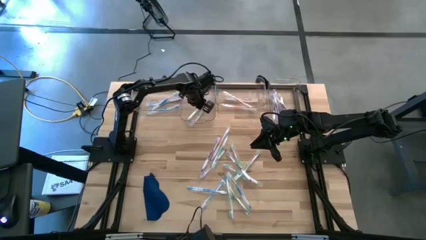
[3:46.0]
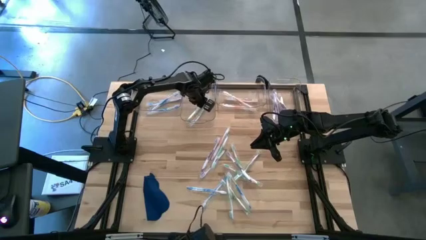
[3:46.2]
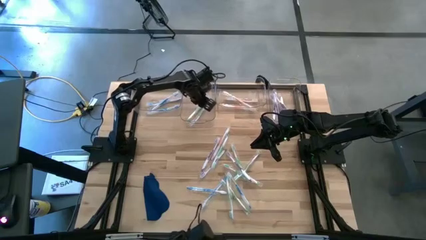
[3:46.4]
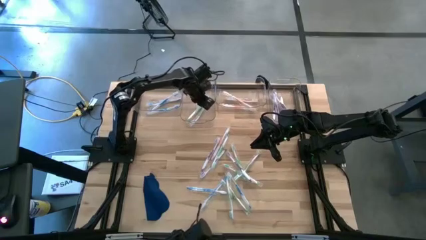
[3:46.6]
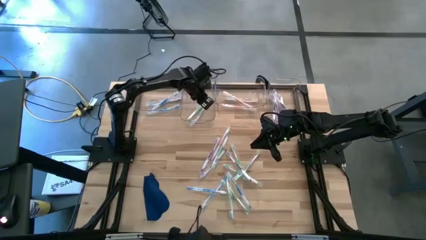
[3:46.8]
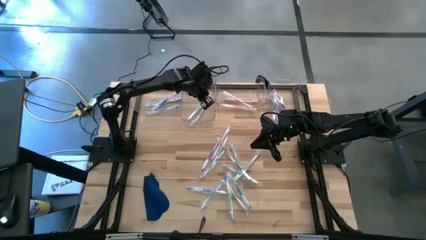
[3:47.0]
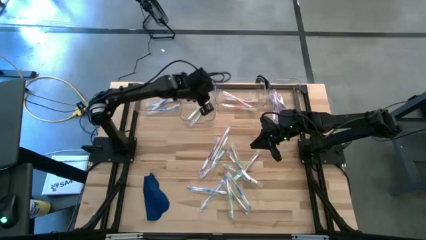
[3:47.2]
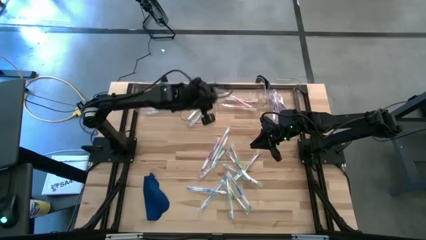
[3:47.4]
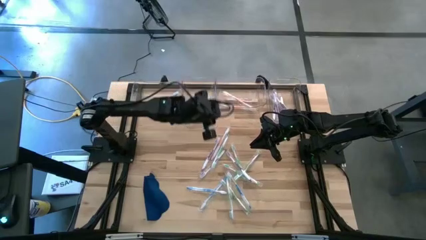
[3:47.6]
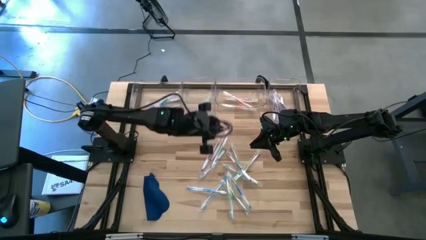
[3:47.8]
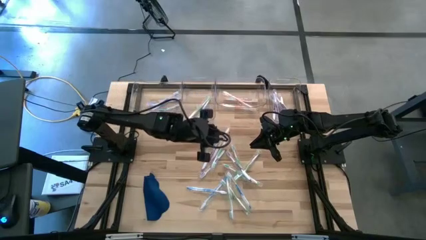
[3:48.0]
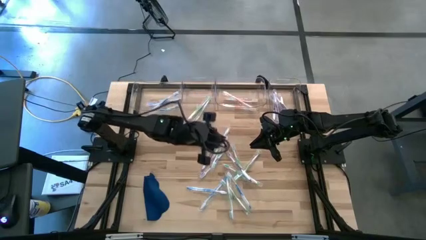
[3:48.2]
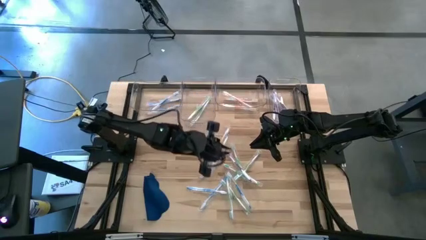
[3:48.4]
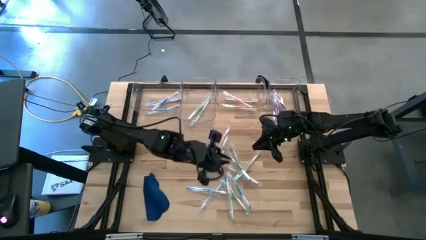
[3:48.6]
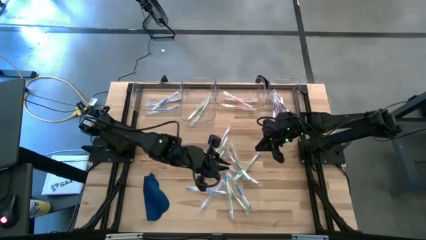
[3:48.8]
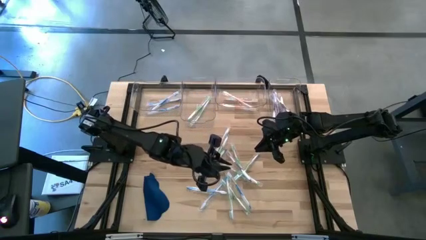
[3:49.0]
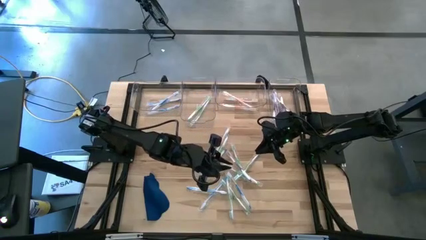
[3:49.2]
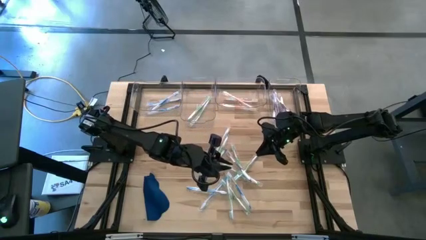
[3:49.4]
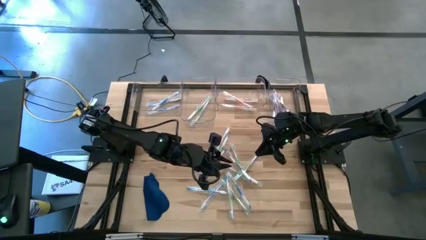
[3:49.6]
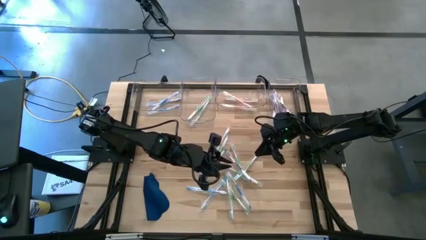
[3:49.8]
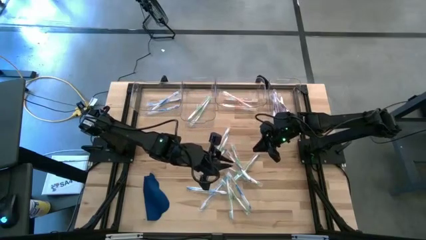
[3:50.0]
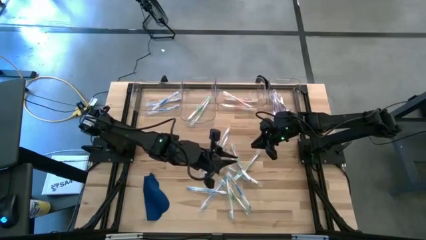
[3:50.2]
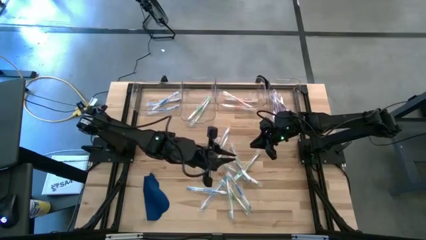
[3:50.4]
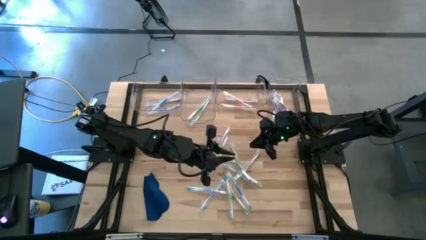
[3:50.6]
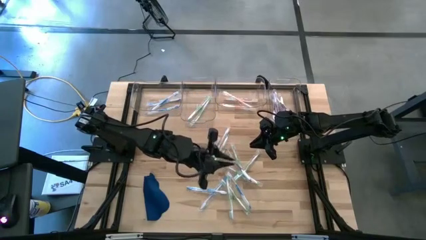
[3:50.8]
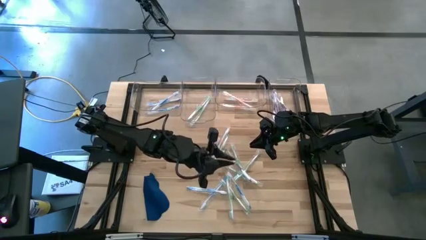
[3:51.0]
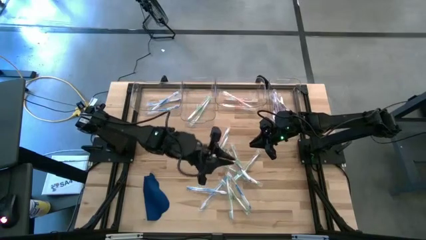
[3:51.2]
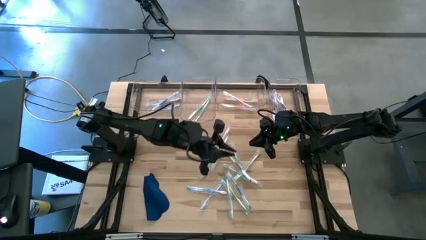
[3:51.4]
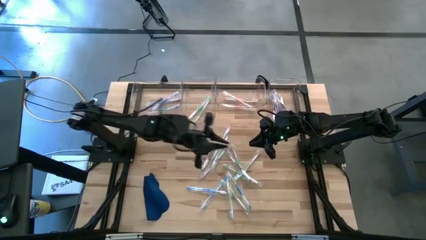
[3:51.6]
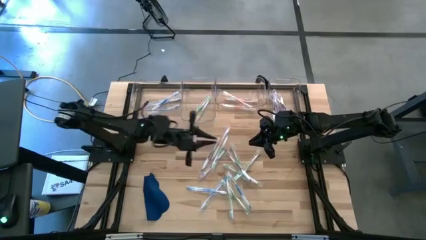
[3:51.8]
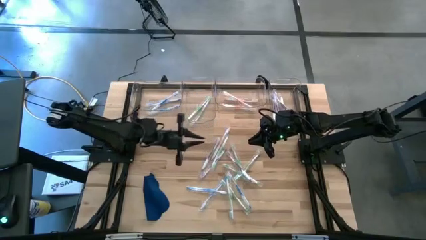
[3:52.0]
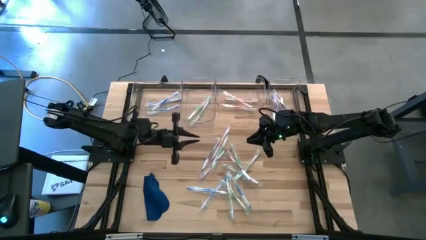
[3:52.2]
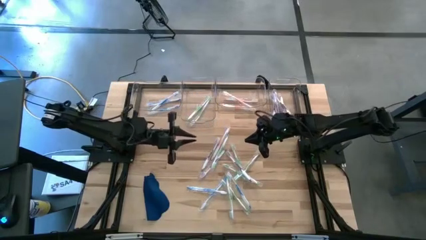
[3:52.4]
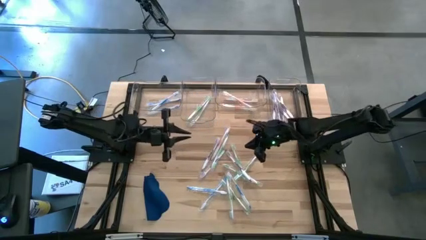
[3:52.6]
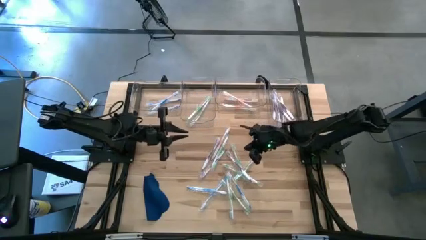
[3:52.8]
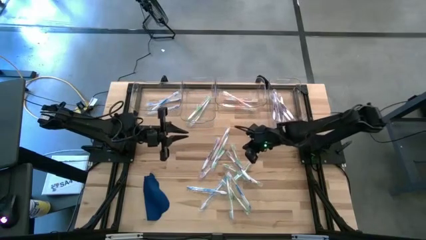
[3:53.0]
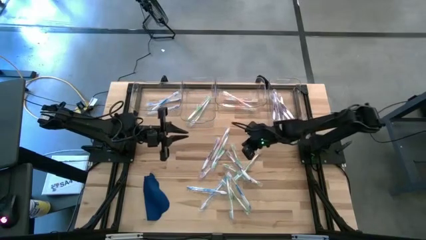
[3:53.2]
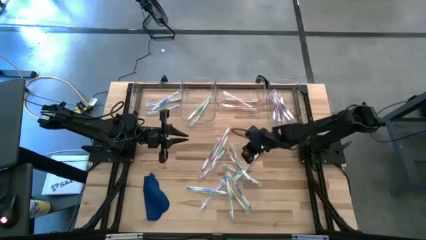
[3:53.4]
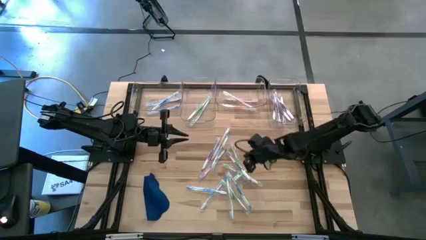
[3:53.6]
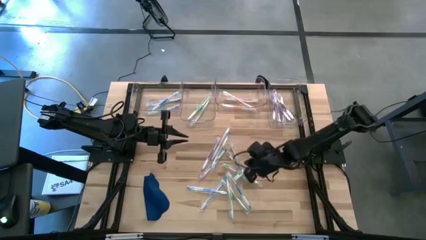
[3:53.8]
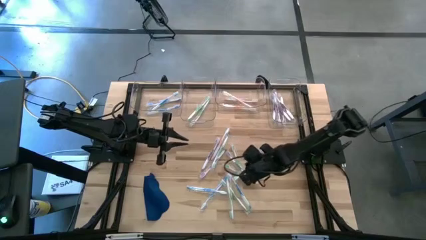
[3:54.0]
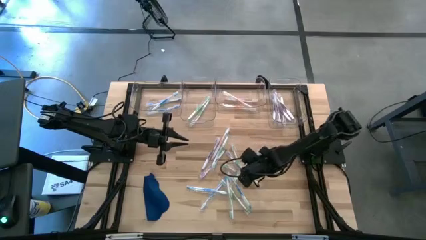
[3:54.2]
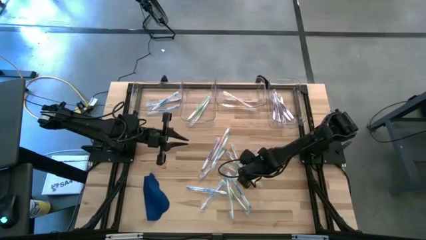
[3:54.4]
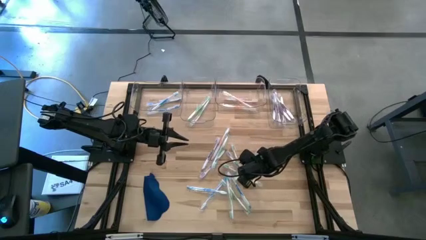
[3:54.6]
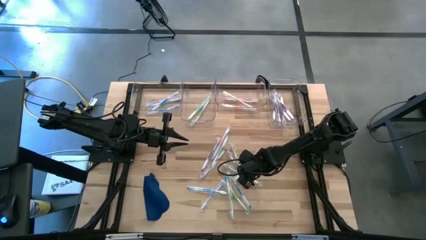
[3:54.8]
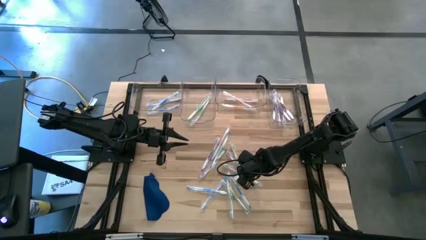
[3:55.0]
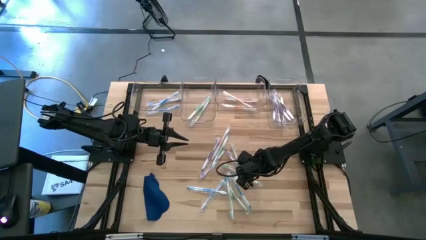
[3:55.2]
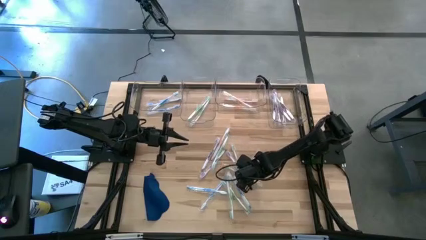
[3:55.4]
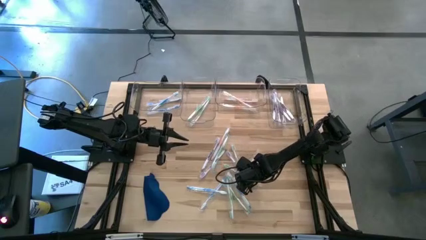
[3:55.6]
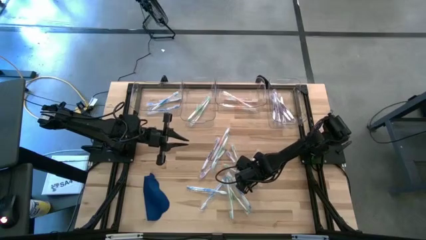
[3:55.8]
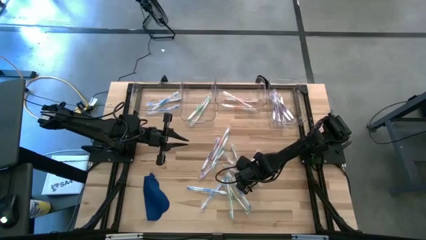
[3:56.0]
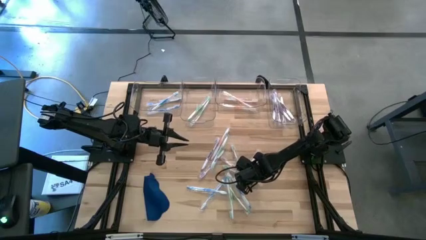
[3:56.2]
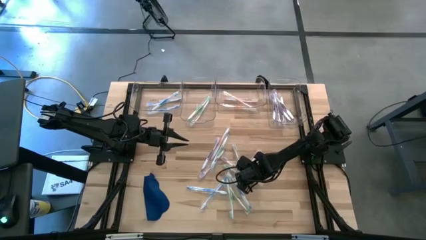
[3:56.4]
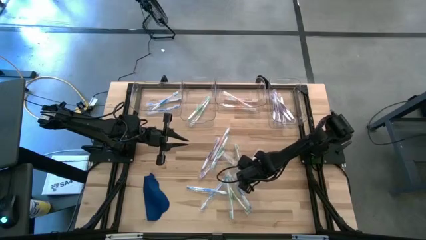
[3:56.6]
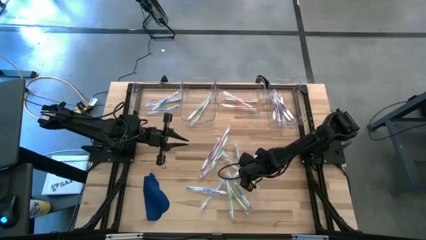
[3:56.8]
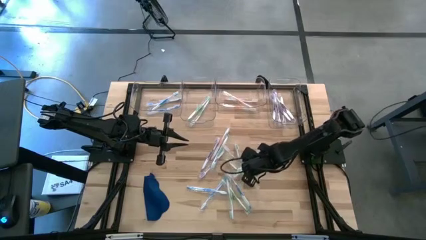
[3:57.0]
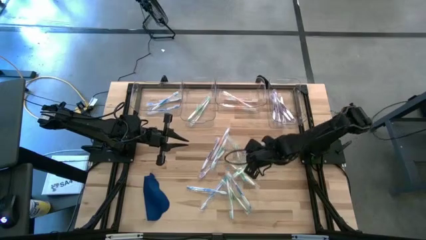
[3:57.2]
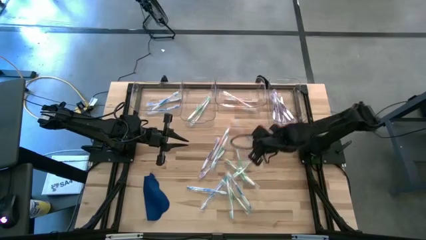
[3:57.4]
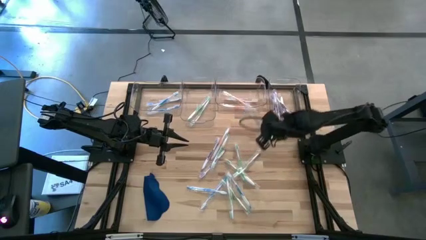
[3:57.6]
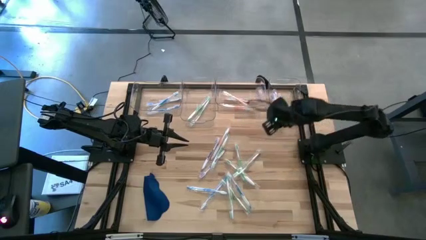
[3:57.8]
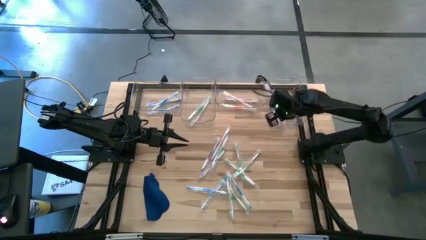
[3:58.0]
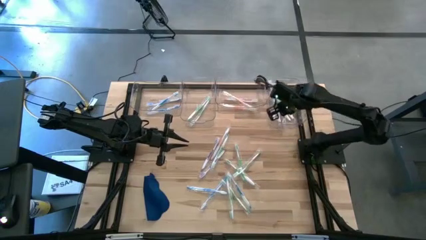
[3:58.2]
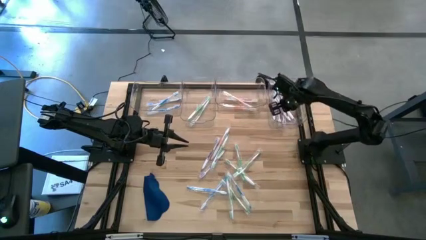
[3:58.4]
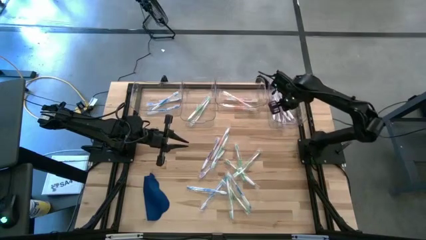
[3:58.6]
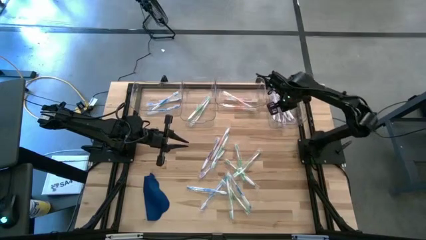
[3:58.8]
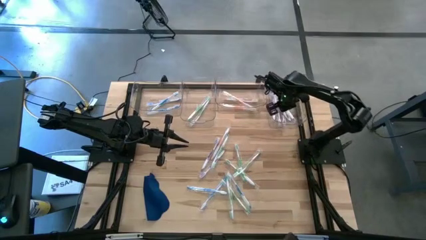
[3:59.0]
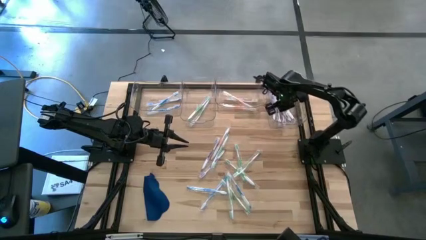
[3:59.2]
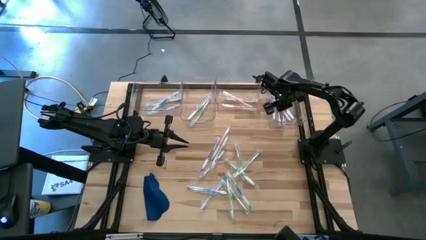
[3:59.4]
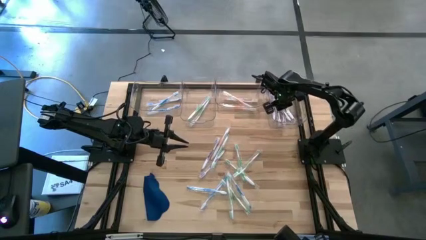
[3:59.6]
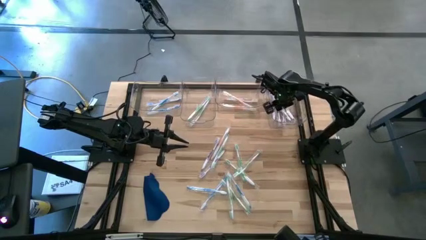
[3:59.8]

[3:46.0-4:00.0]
Task: Pick & Place Toothbrushes
Put the purple toothbrush into the right transparent bin

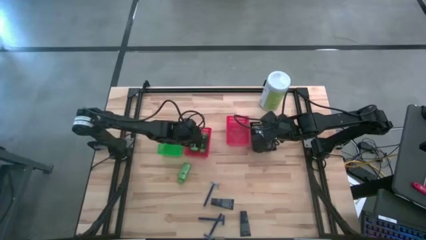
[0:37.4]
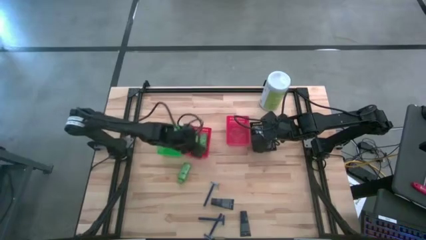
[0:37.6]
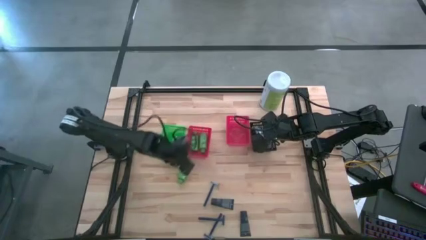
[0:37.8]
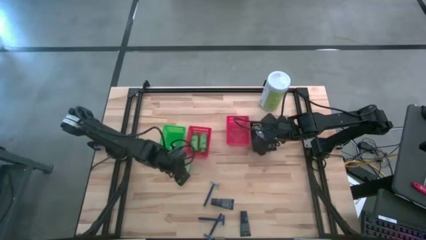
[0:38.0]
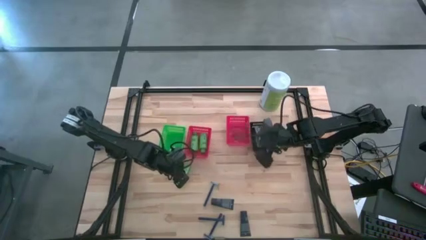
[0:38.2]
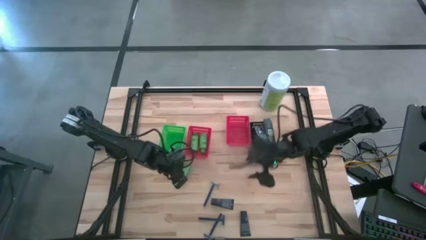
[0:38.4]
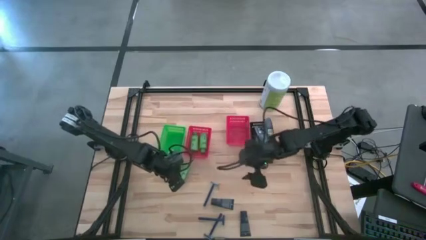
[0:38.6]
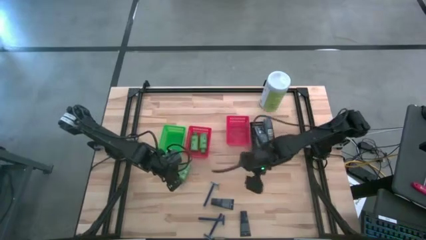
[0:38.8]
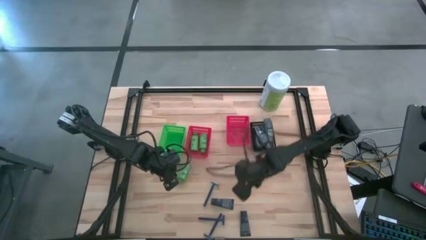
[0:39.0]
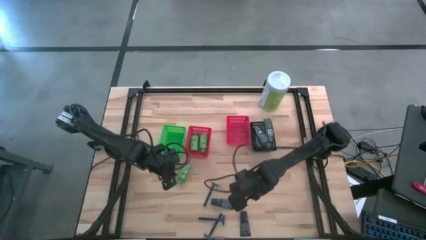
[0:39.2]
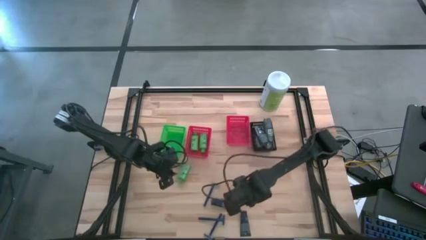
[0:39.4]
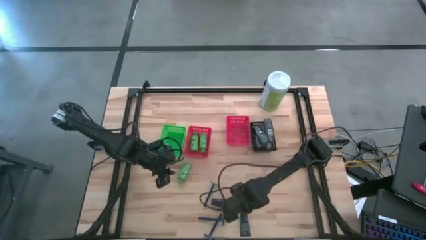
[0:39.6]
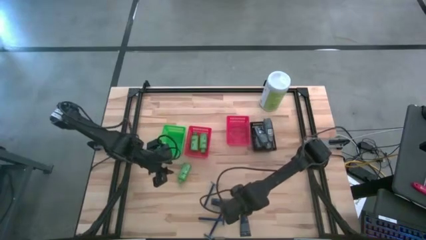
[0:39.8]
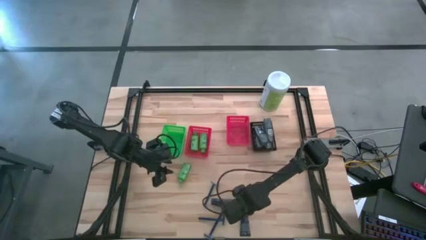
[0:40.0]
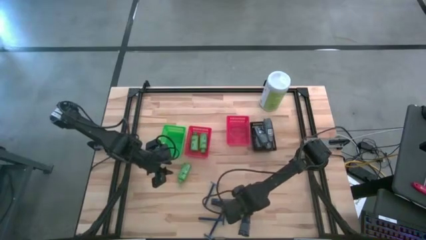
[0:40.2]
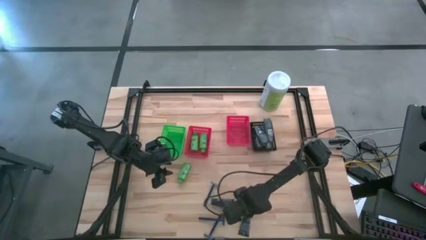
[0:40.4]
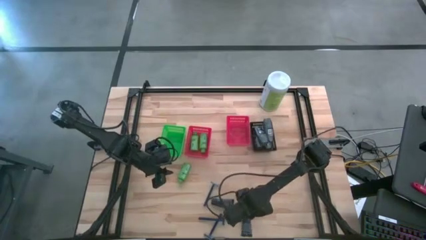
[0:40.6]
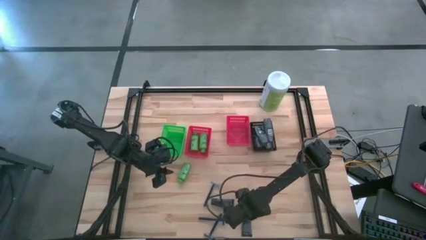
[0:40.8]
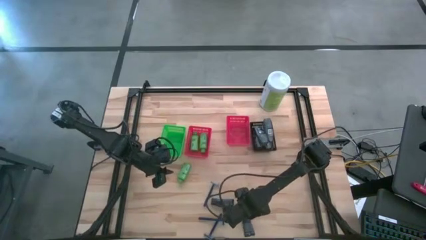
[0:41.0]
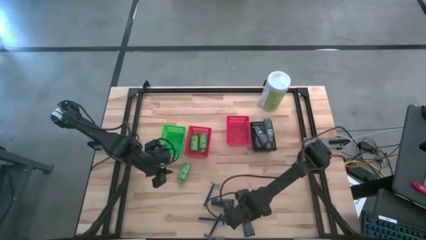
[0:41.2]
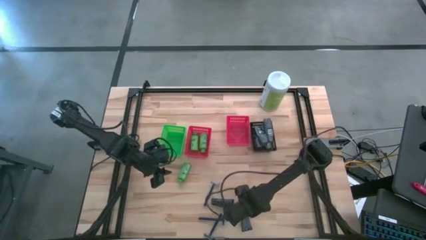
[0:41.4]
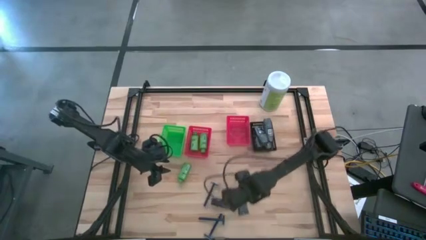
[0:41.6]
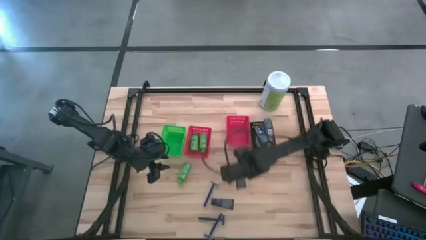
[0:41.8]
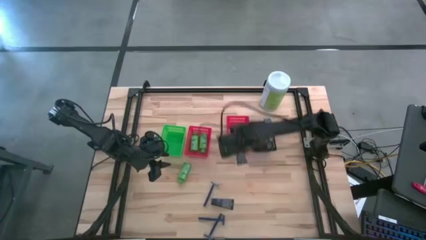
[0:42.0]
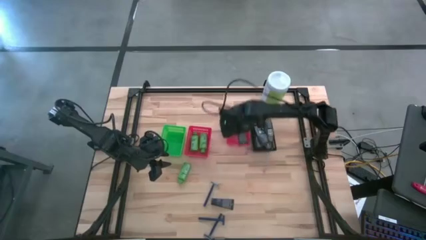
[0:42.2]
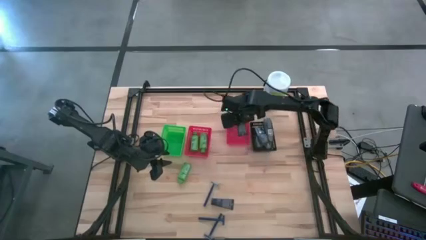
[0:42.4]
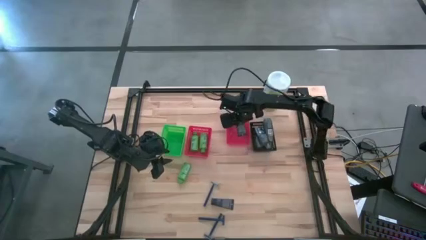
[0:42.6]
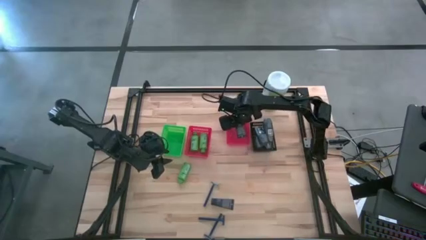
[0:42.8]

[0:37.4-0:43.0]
Task: Pick & Place Travel size toiletries
Put the black shaving cream into the right red basket
